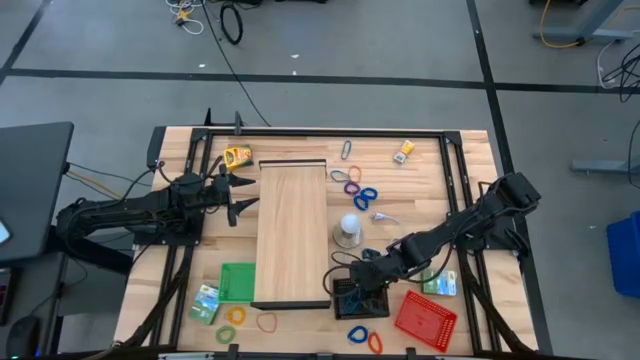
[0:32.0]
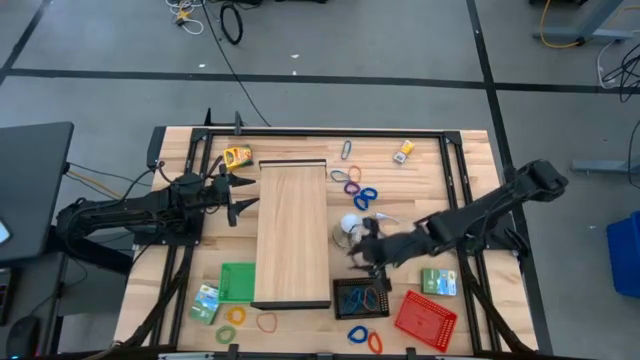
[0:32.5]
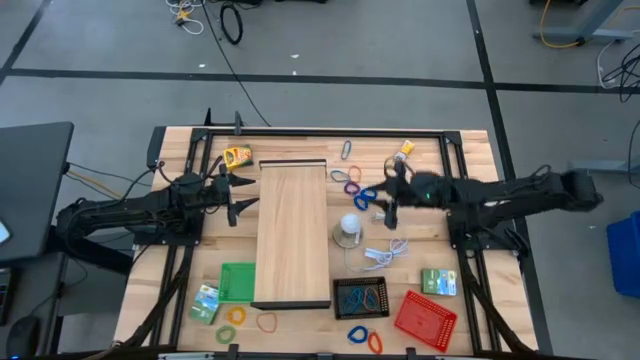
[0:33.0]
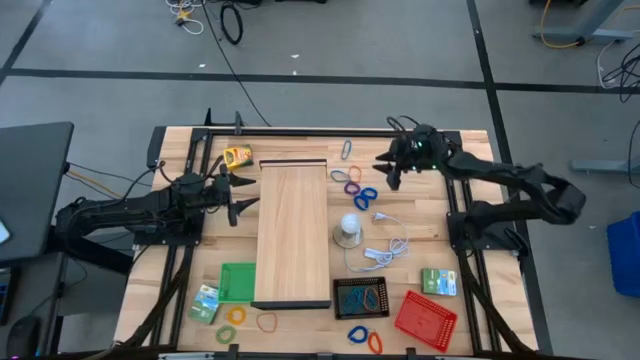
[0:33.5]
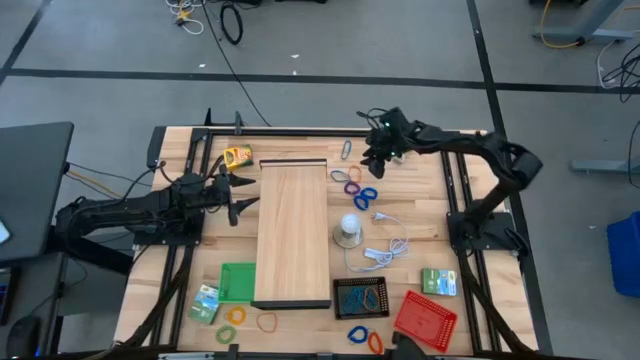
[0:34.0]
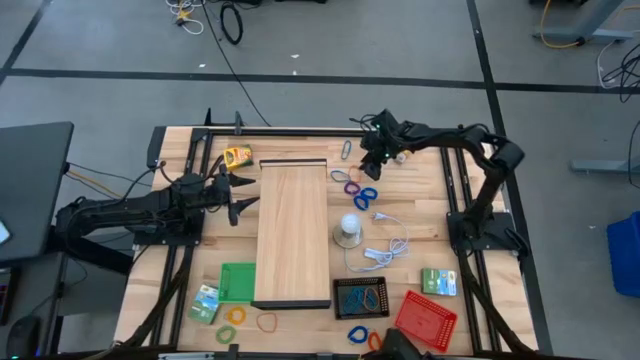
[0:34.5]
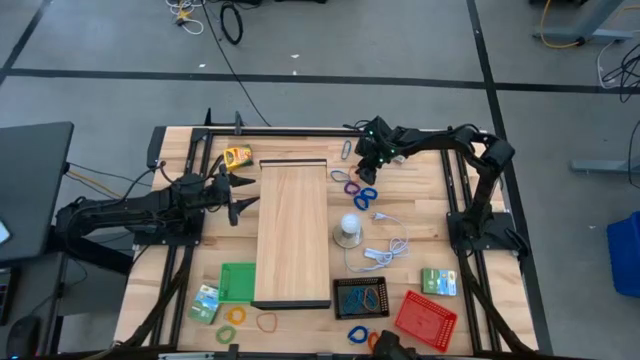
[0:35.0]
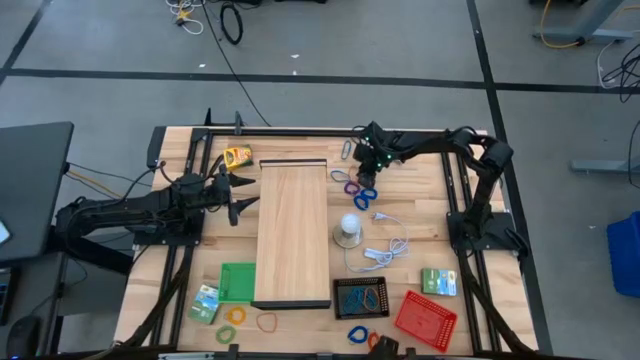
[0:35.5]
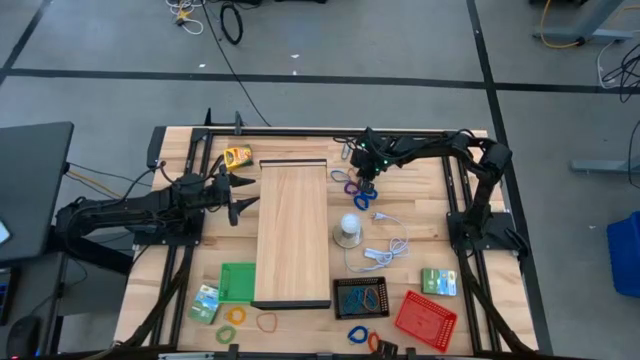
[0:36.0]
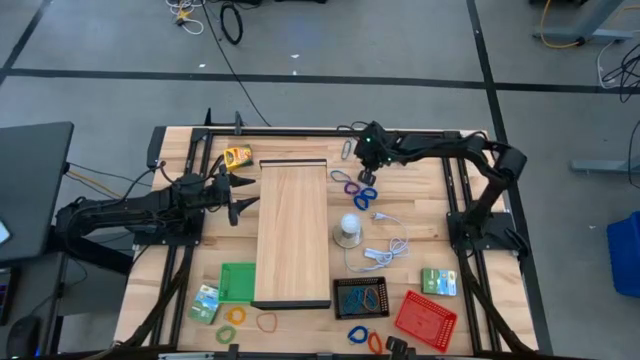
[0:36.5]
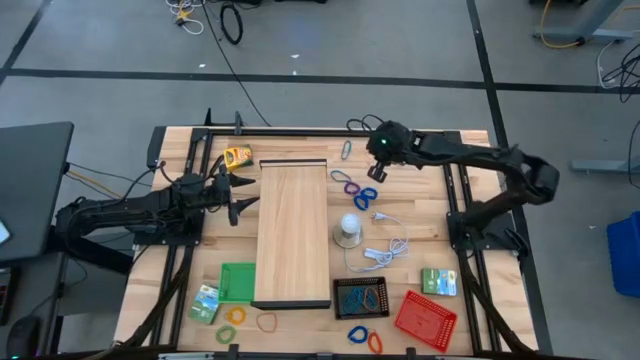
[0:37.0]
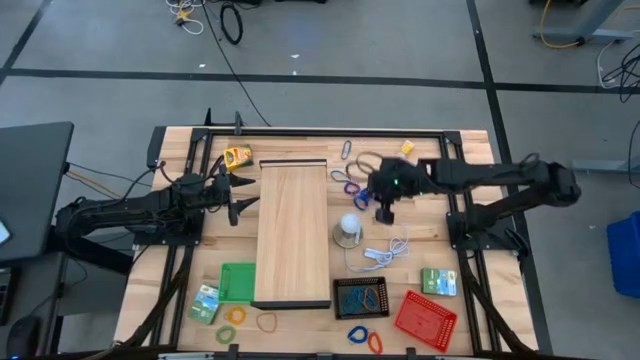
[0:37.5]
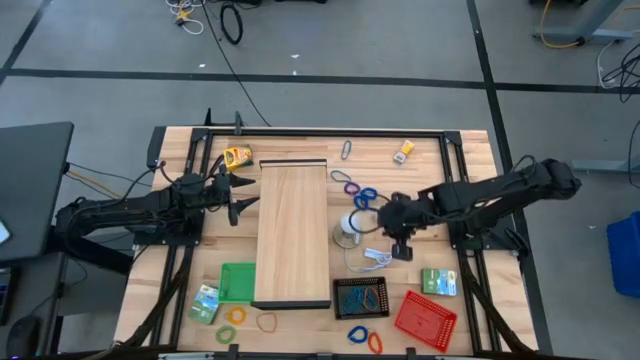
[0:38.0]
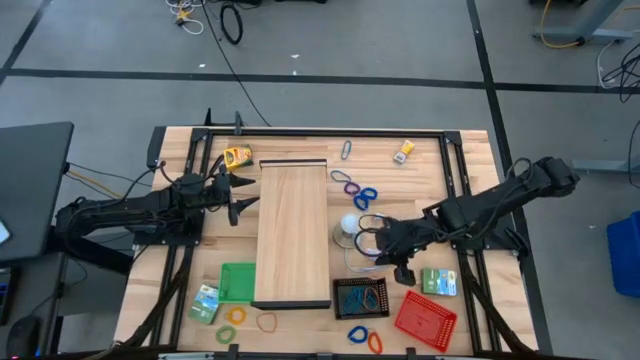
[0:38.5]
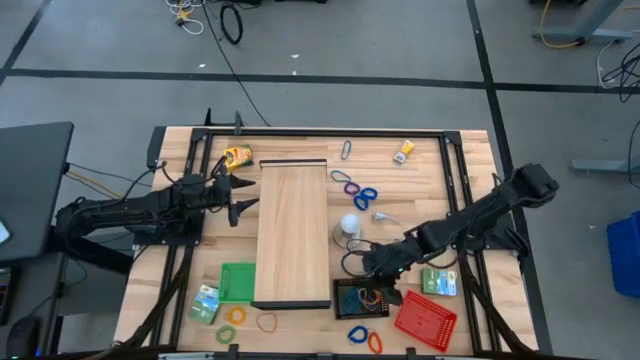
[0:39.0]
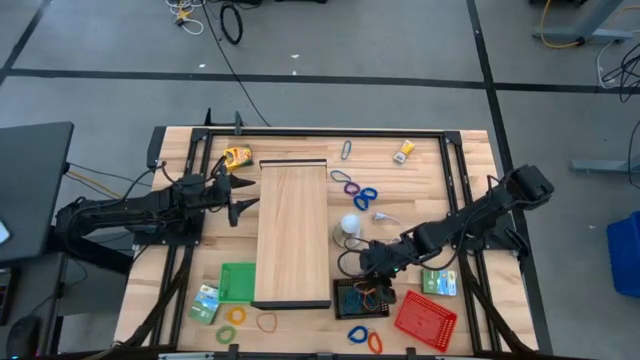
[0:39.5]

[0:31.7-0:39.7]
Task: Pick & Place Office Desk Supplies
Put the top orange rubber band into the black bin

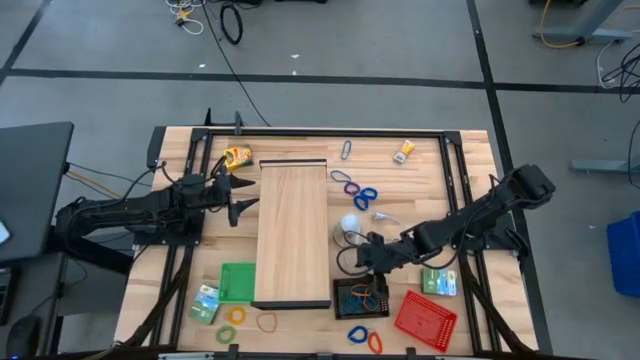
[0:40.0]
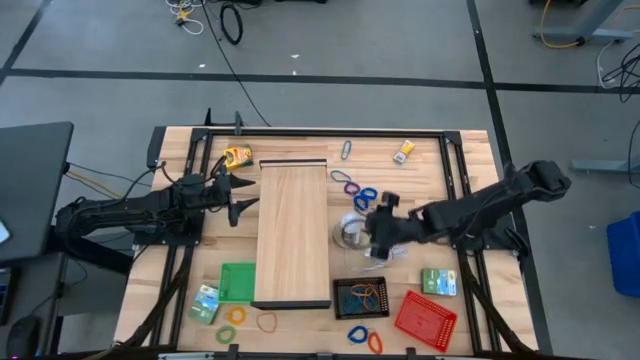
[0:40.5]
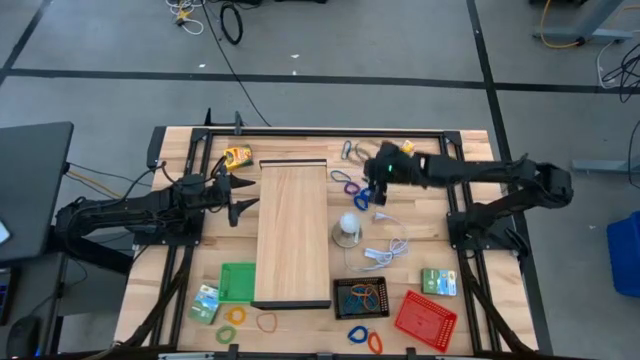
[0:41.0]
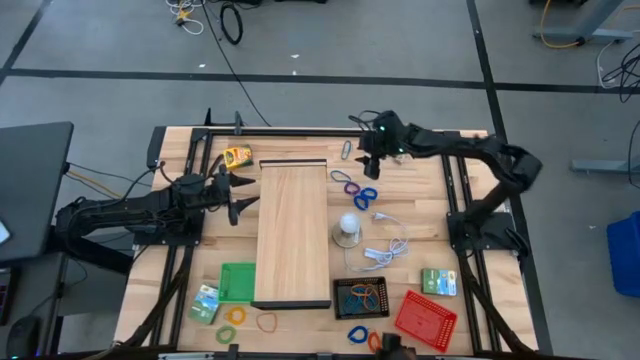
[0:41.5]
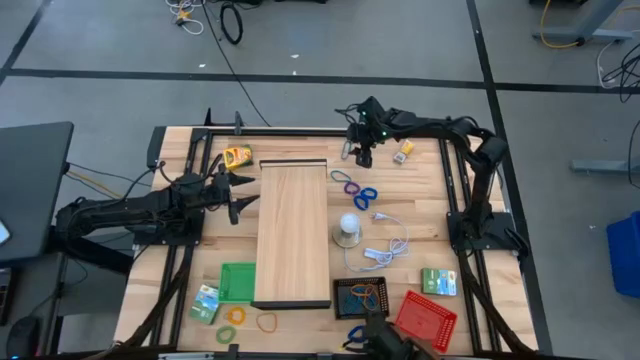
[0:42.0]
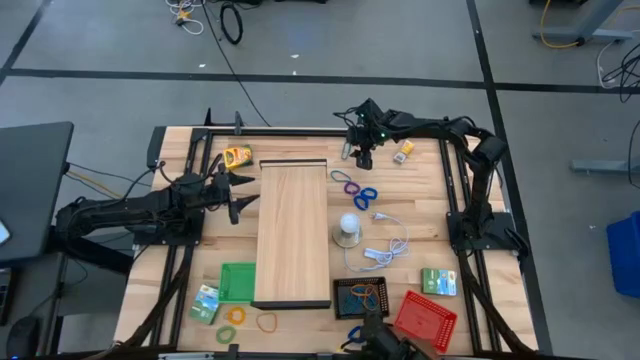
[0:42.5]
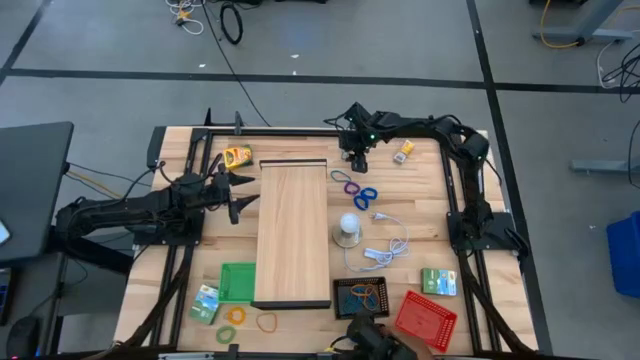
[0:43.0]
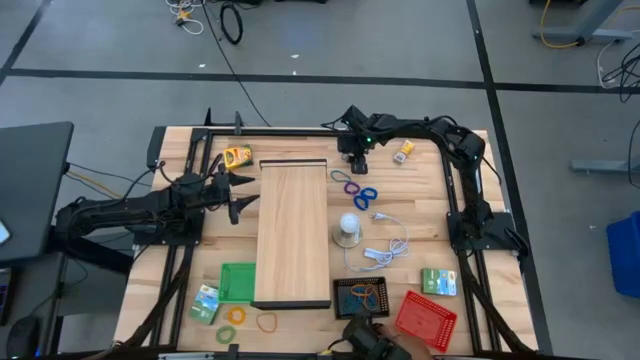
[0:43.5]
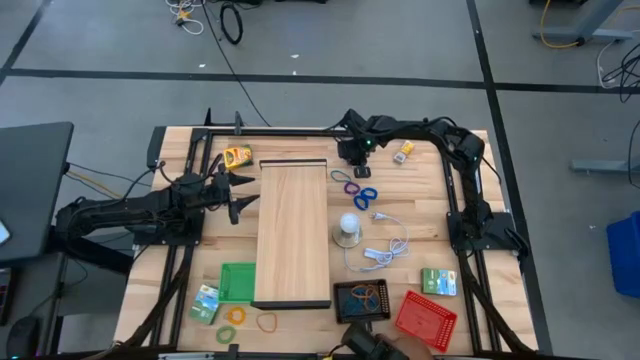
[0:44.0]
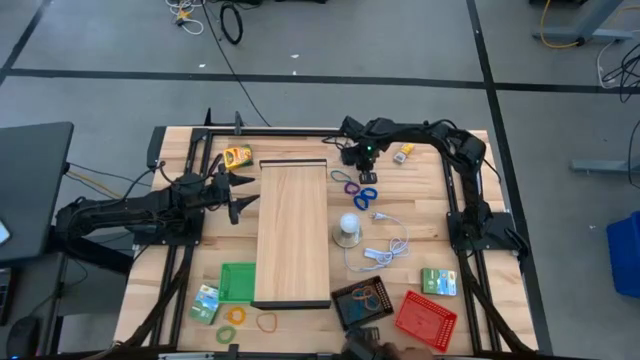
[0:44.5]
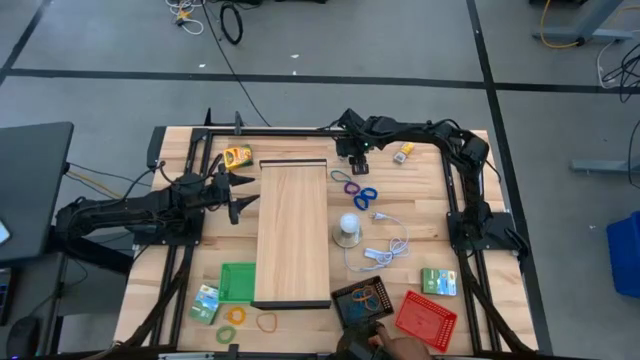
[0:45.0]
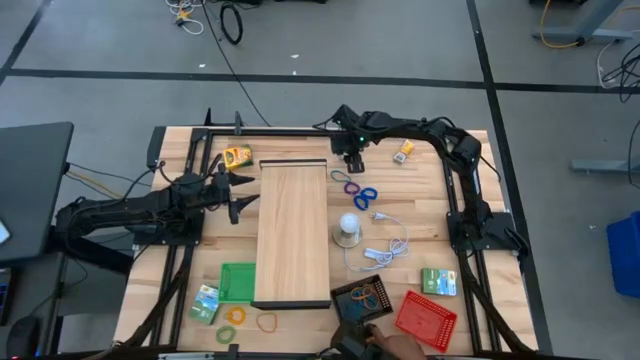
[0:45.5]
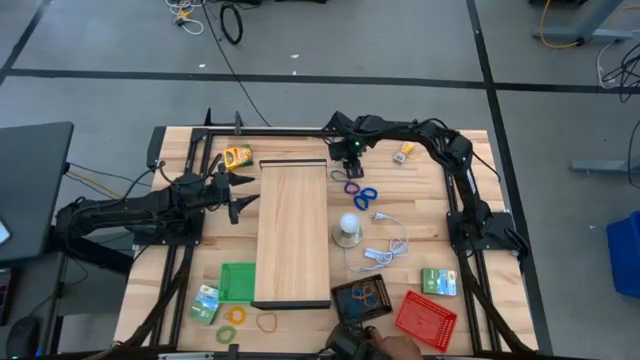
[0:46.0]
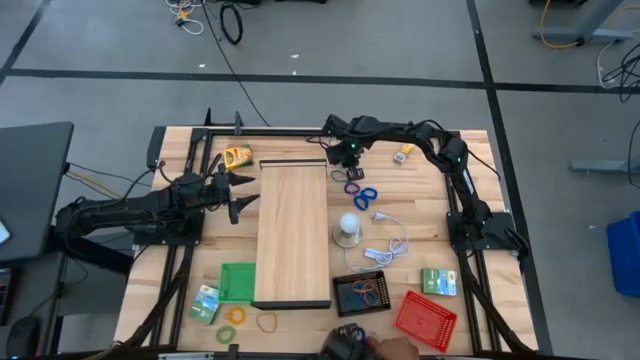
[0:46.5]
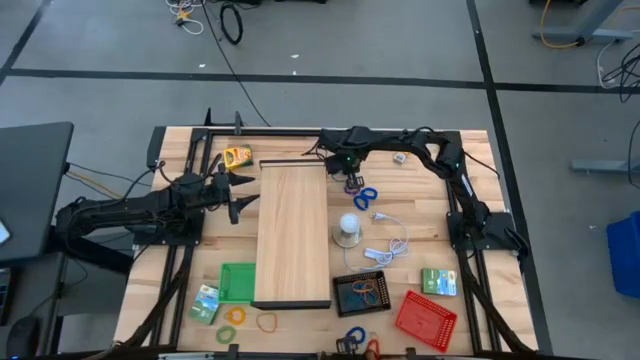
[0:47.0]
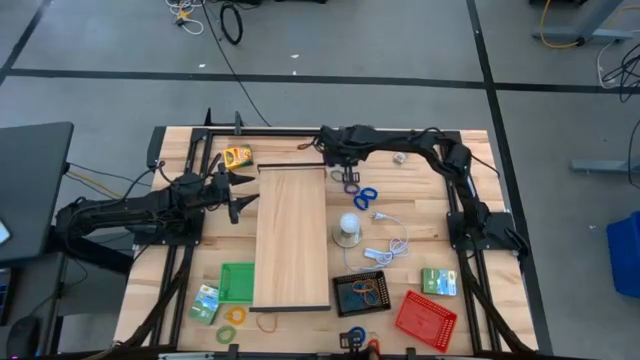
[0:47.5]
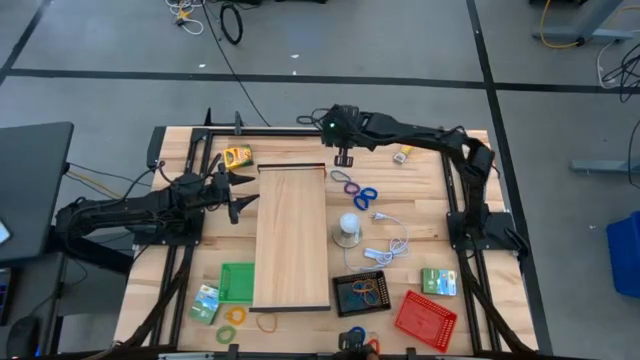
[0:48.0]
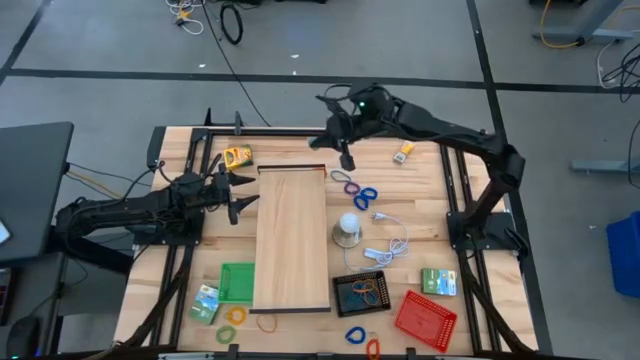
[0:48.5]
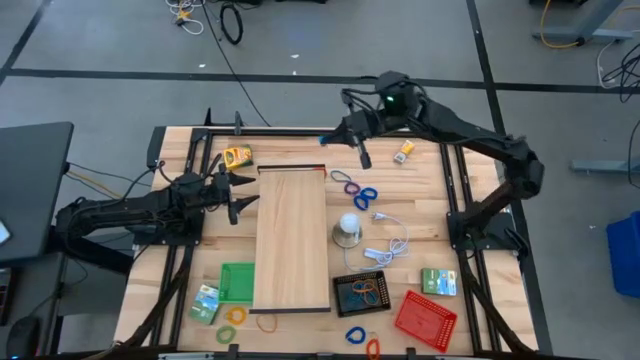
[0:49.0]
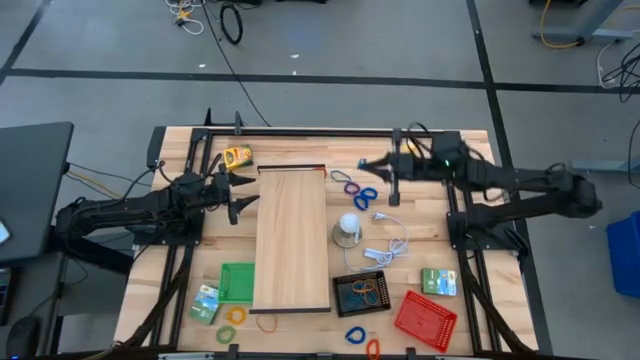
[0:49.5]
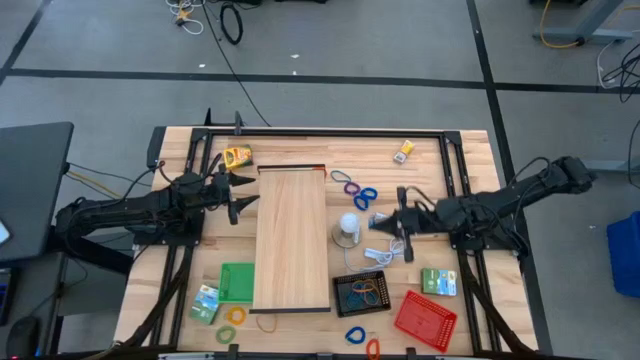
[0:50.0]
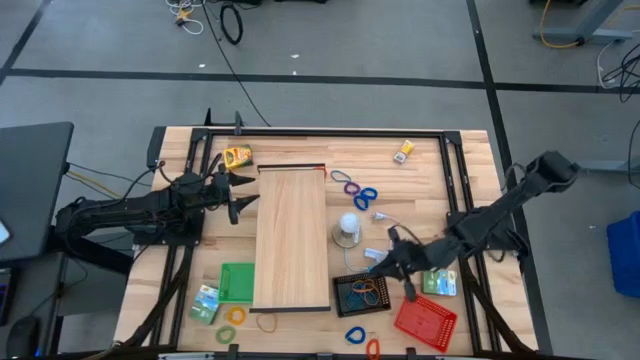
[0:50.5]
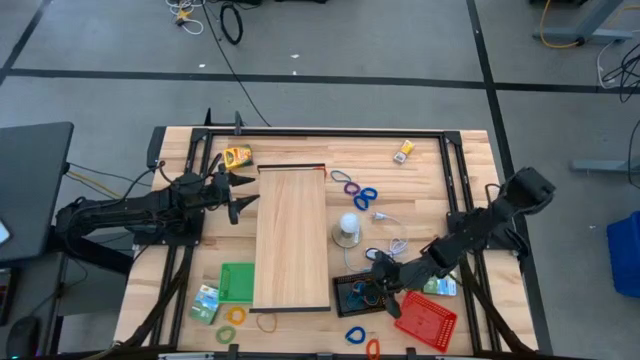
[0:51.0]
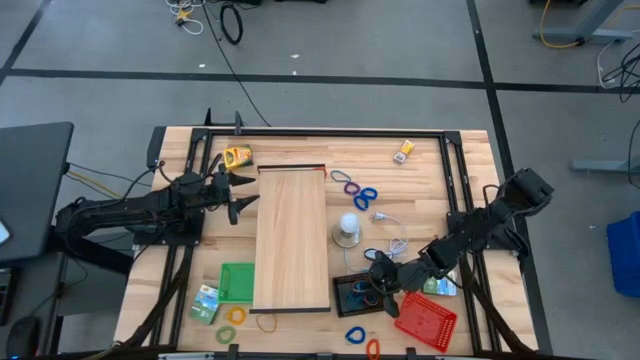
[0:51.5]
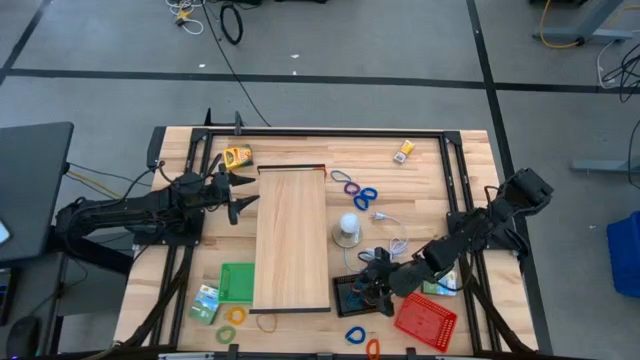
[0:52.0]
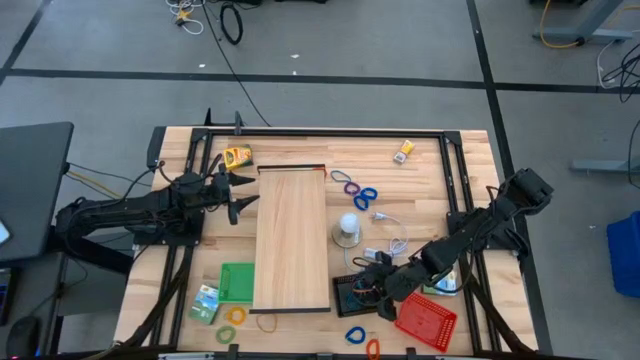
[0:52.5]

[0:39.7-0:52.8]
Put the top blue rubber band into the black bin
